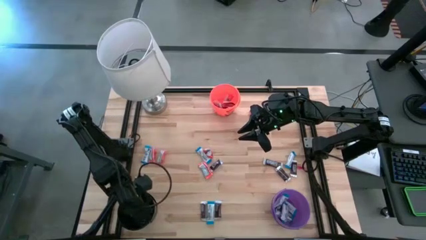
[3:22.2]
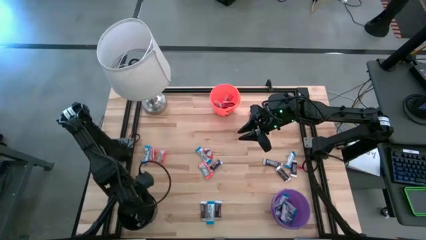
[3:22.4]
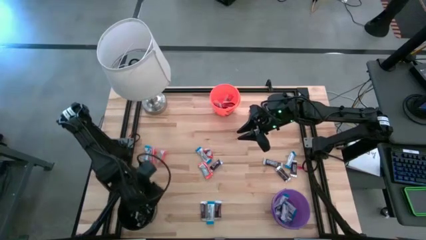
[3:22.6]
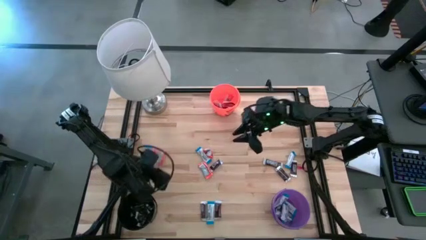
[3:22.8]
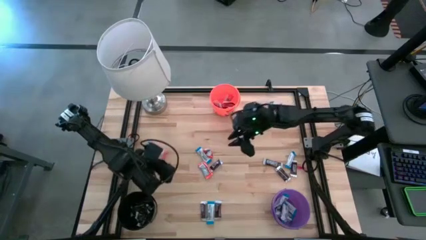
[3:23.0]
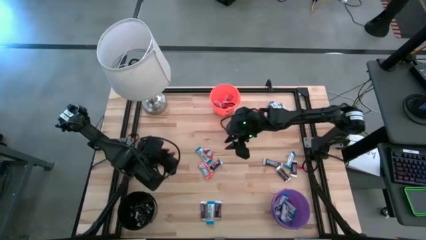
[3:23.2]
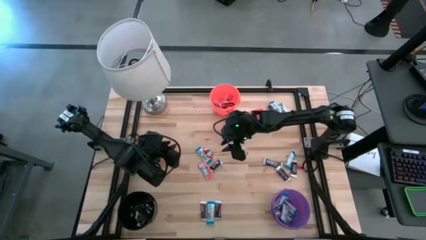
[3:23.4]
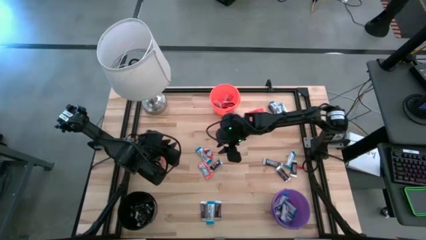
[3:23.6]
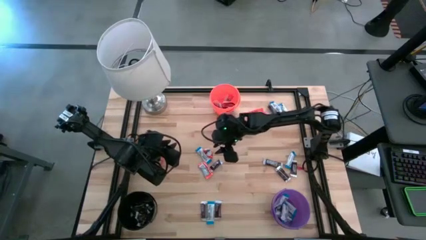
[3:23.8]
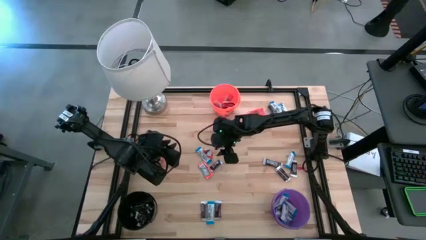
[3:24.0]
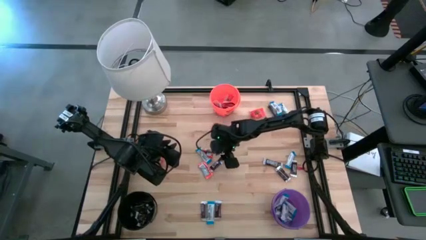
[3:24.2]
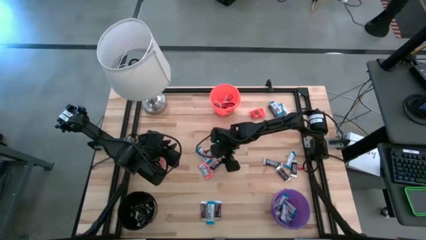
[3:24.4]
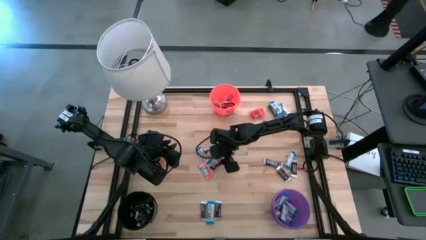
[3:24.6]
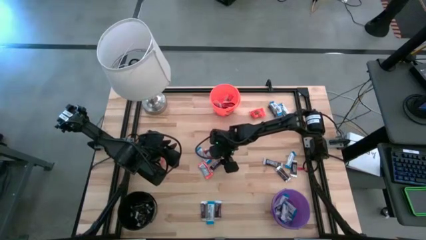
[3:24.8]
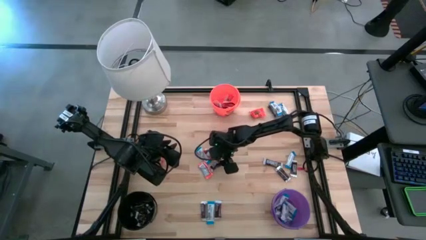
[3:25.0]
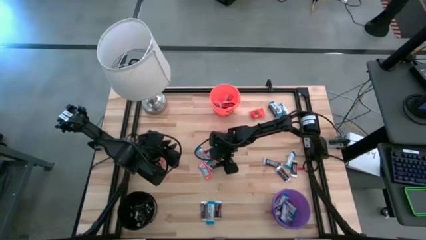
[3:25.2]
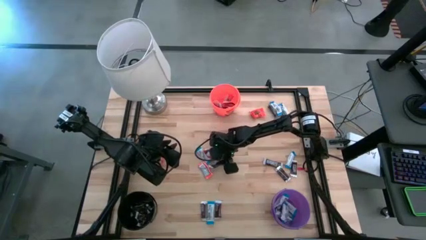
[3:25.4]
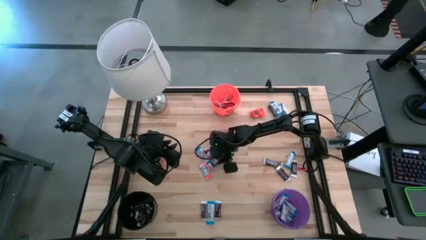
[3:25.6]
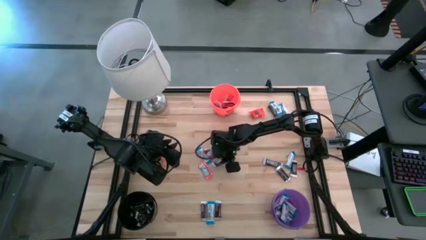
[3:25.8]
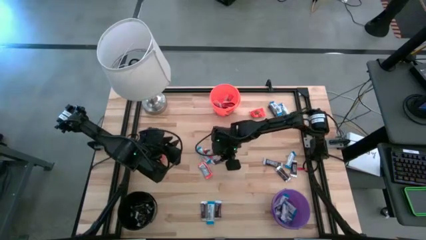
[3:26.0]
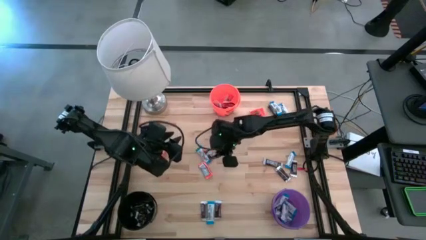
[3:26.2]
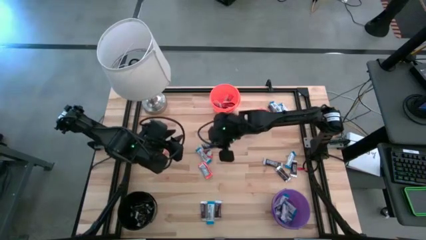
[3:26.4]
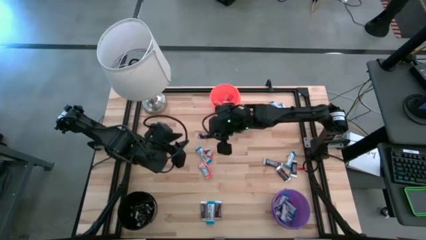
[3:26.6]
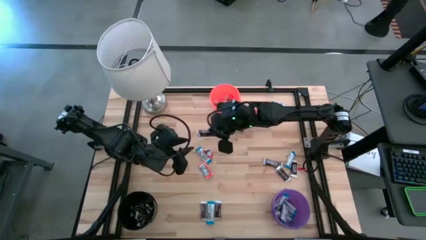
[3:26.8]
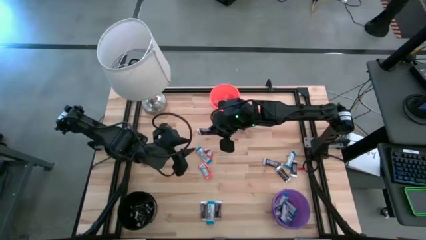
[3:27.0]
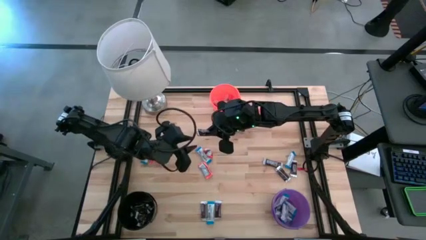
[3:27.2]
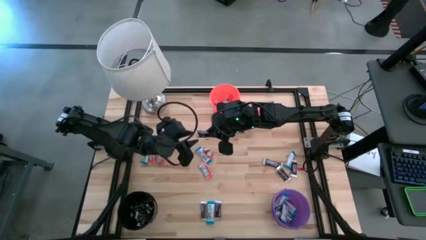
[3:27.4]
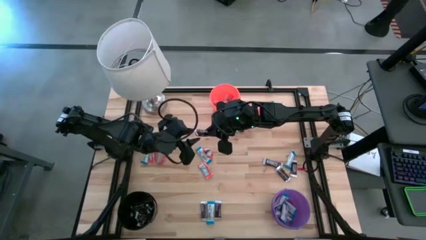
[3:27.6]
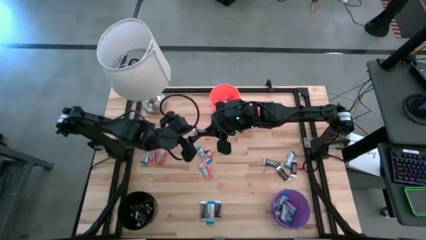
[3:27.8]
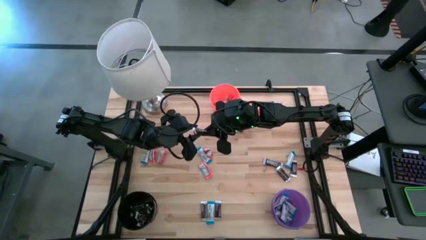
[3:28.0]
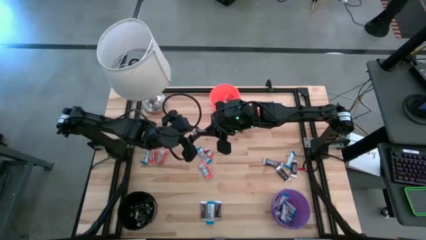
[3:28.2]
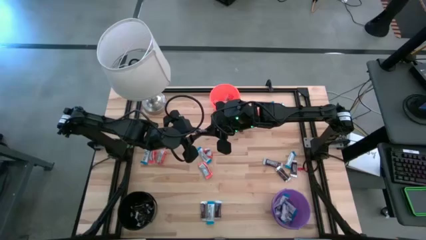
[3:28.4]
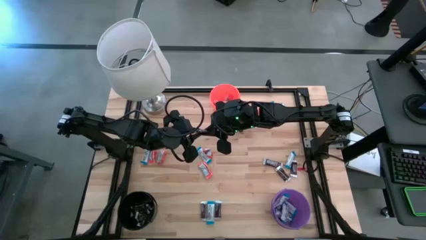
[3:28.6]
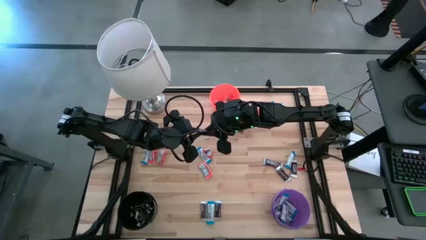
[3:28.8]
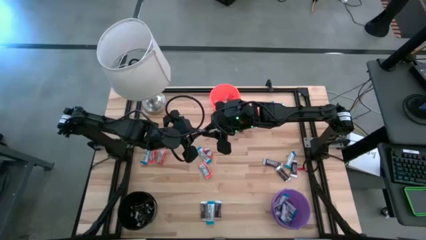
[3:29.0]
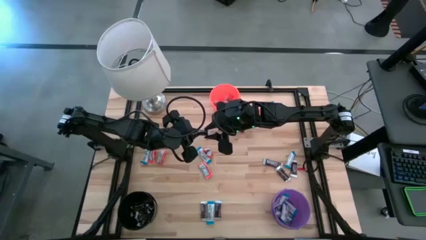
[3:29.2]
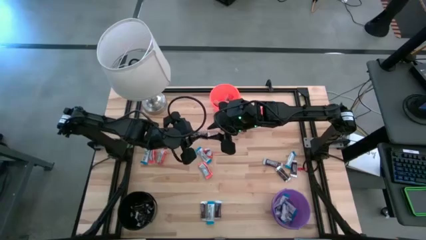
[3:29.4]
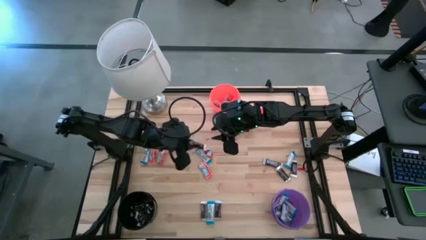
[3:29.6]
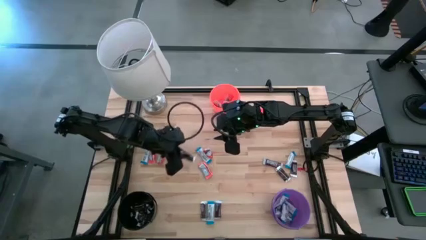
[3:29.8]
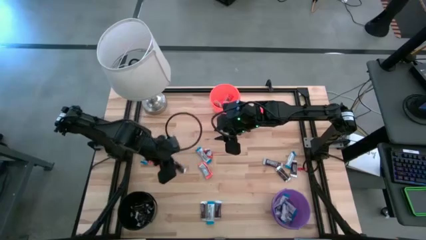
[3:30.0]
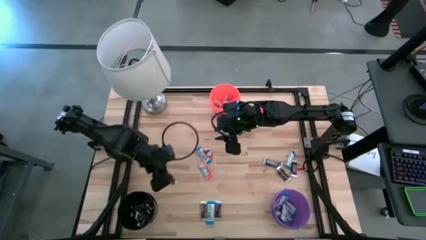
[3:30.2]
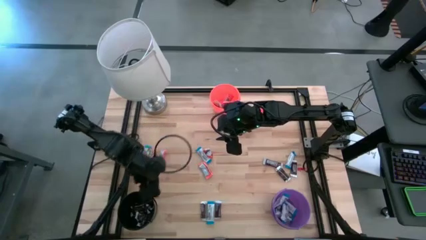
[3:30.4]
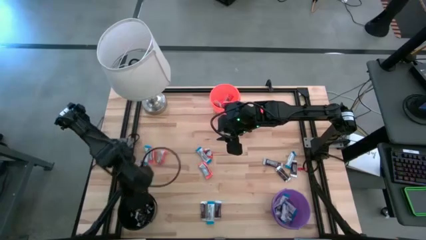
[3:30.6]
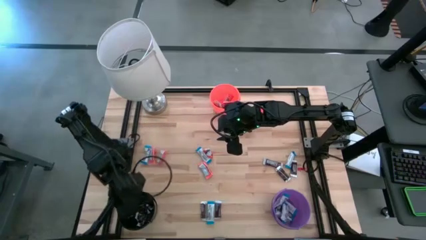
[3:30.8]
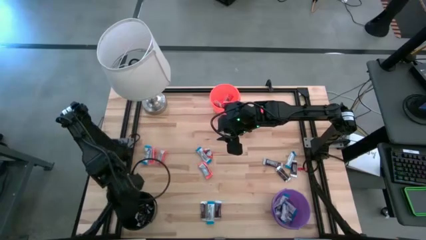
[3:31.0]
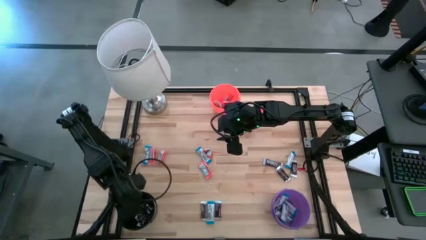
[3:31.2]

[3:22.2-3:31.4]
Task: Organize candy in baskets
Put the brown chocolate into the black bucket

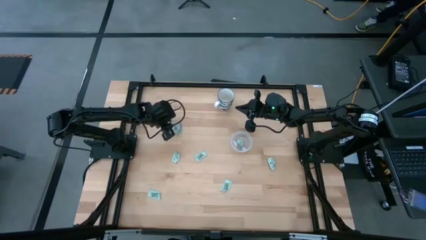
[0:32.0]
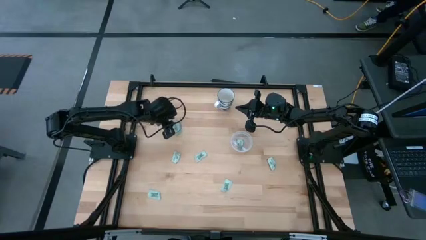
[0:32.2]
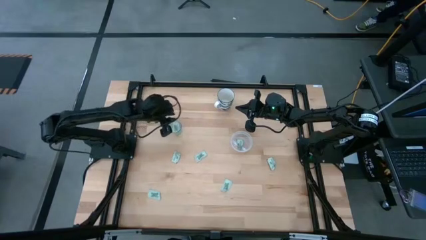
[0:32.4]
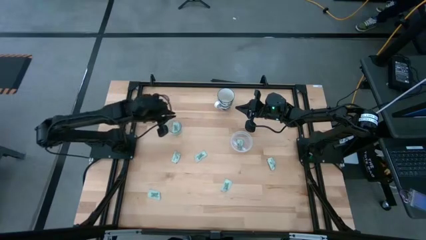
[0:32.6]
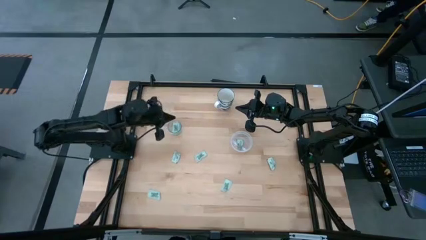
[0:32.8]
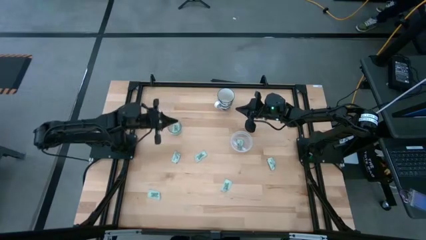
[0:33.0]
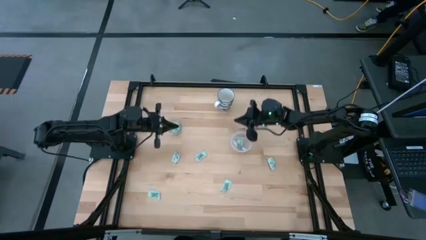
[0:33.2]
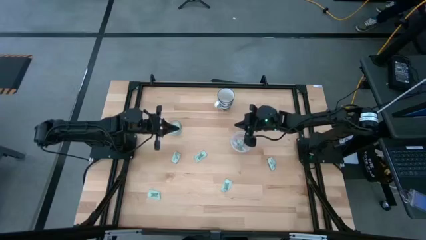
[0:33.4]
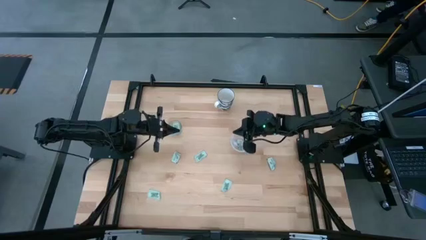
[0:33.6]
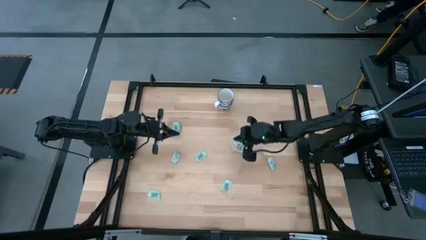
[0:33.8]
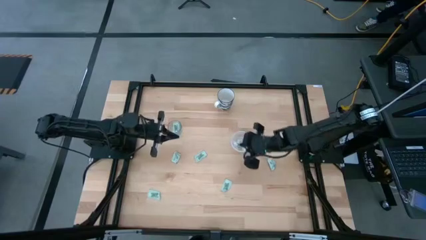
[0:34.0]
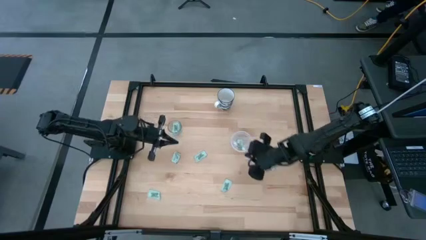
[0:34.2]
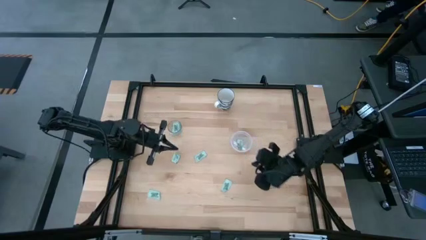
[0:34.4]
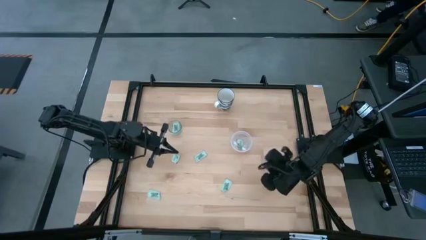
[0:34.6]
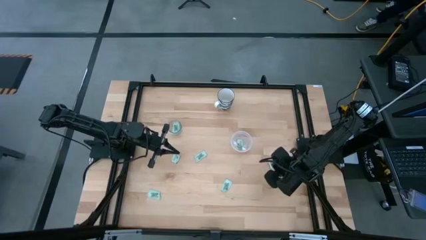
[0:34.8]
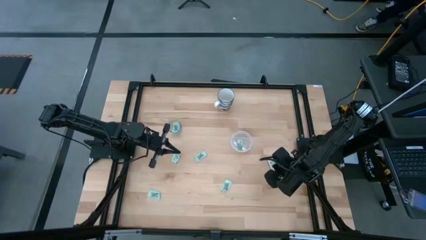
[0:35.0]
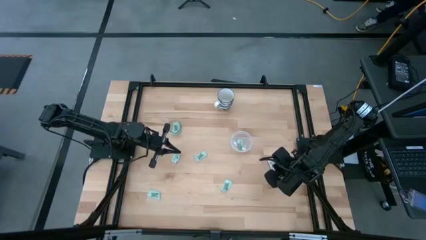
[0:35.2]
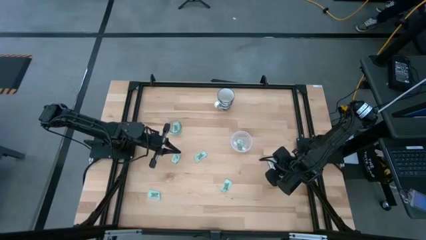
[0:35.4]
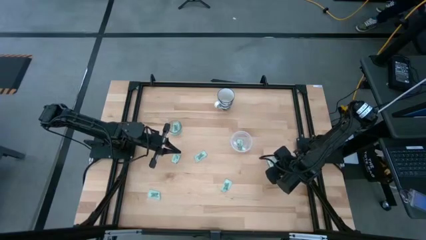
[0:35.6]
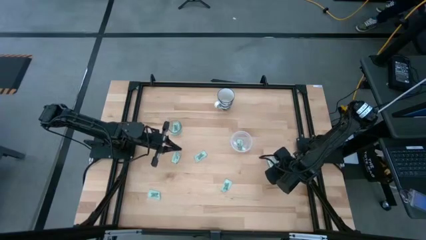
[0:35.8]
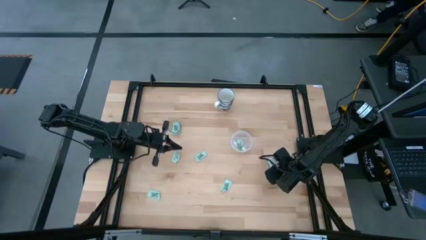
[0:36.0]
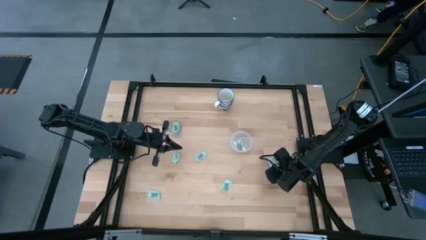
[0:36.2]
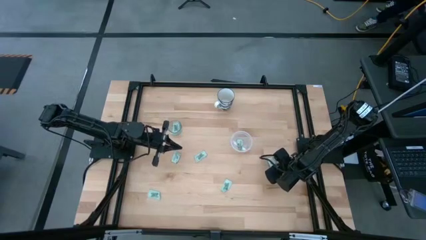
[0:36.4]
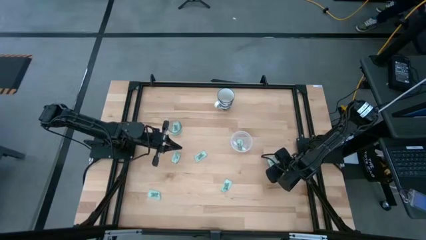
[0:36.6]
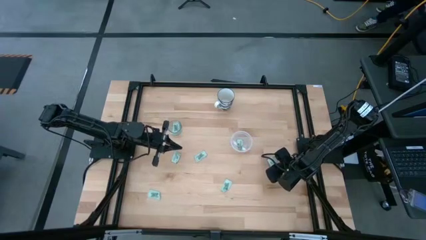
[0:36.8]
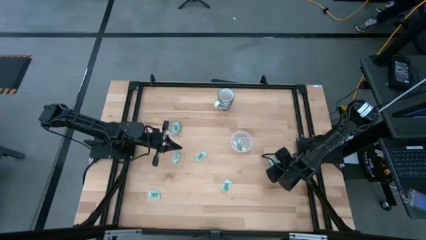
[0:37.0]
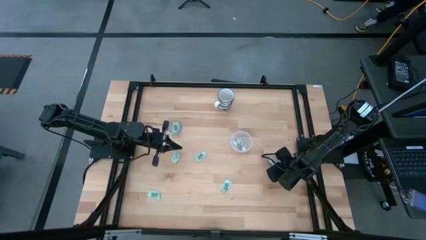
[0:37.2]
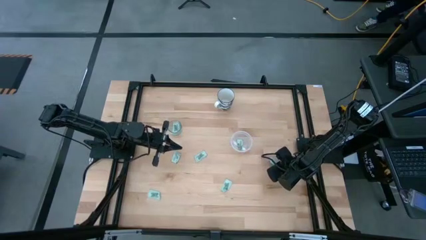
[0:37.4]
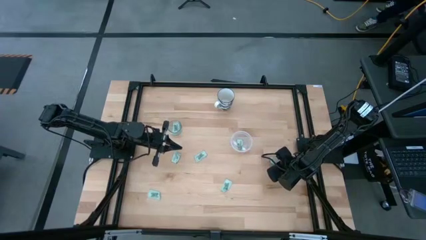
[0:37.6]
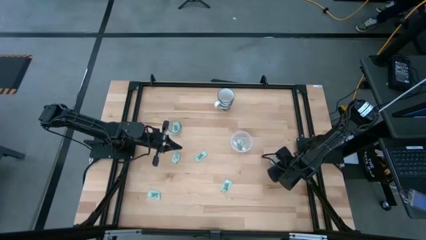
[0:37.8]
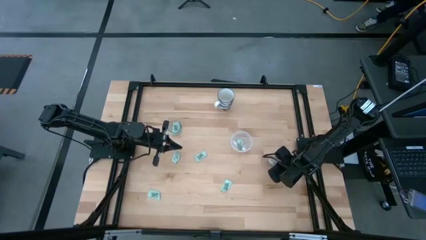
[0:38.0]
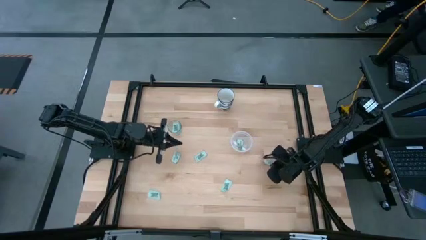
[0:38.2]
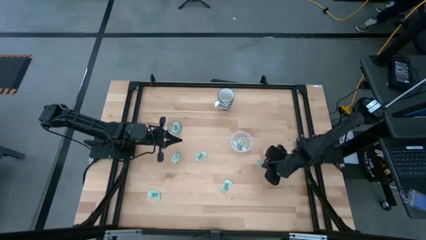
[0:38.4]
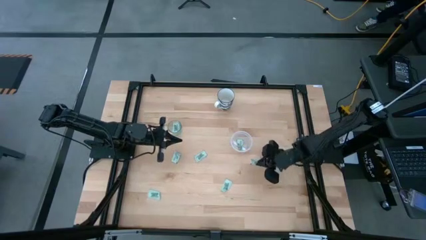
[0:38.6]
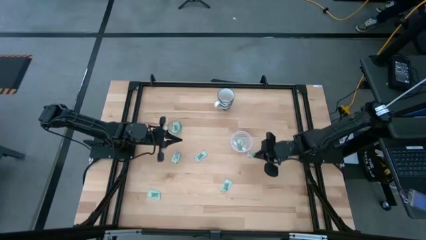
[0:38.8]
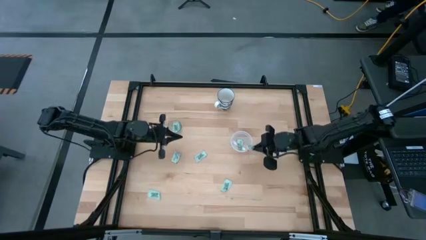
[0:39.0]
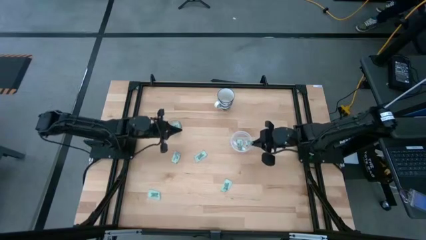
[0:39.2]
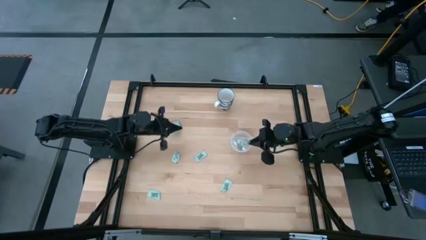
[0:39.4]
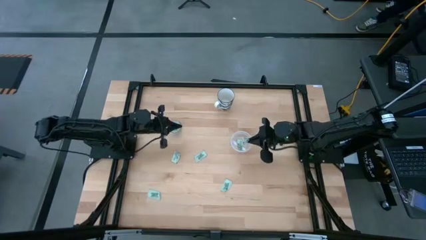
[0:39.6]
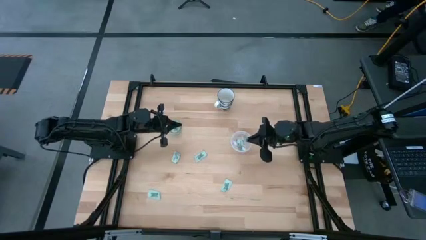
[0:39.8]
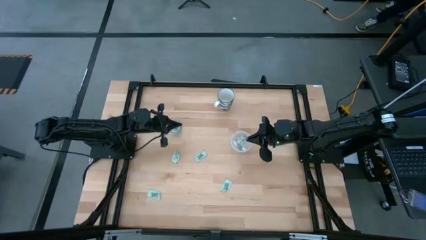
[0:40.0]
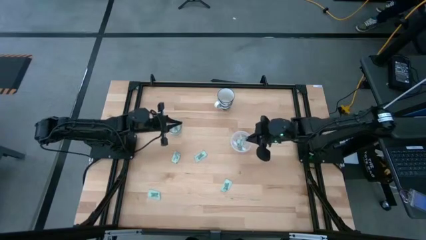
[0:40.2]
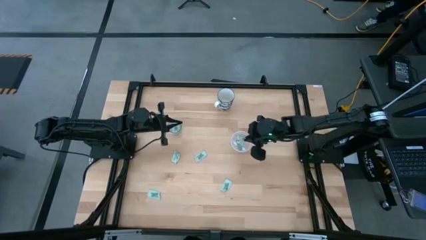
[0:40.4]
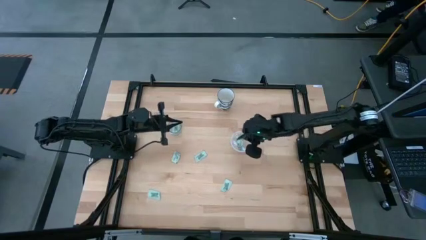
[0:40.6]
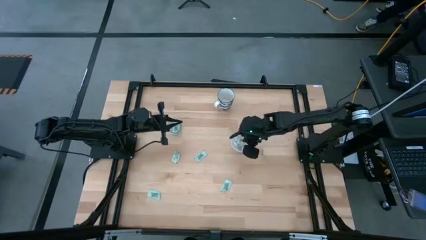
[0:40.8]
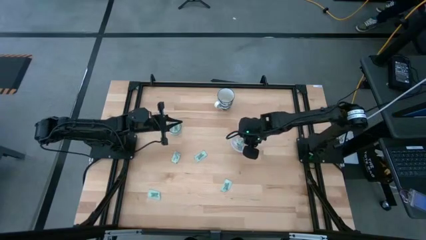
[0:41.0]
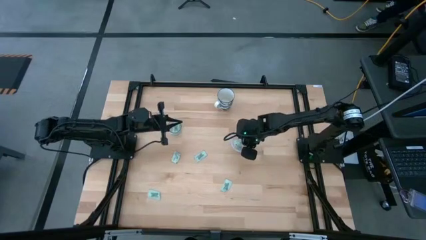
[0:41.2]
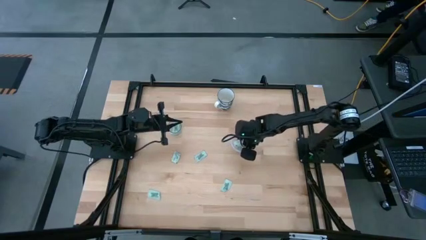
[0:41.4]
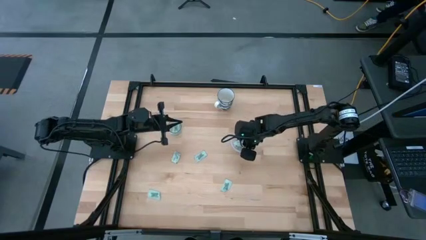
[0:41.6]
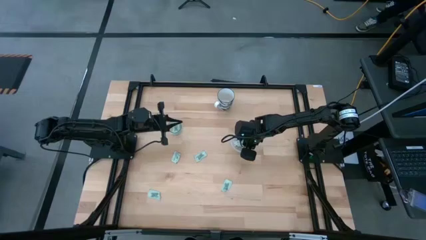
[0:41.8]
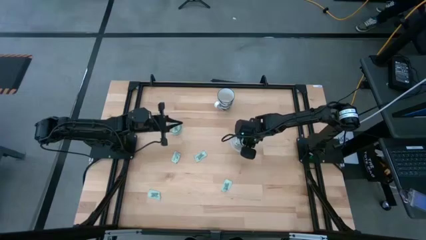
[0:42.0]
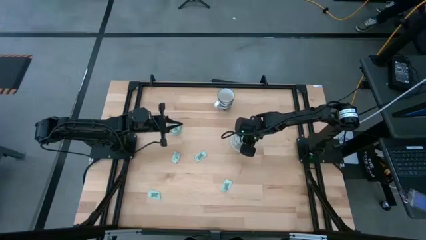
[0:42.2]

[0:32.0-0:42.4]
Task: Pick and place Stevia / Truvia into bins
Put the stevia packet into the transparent container
